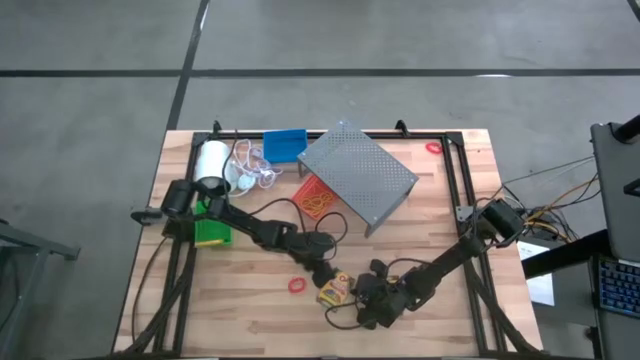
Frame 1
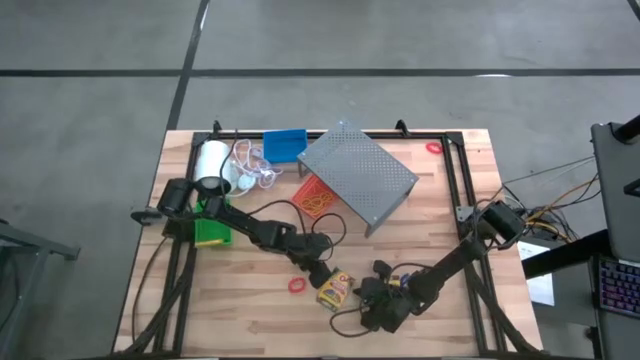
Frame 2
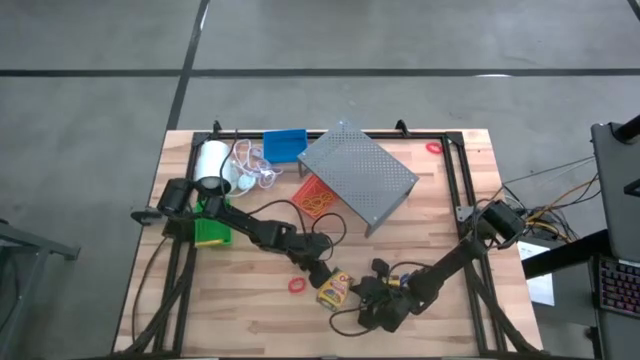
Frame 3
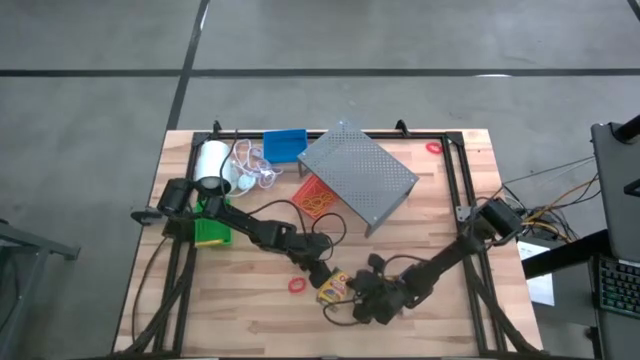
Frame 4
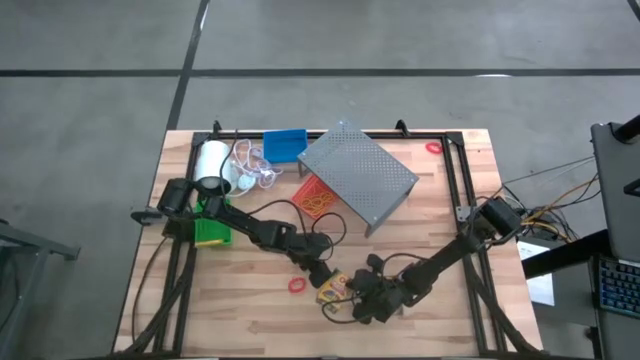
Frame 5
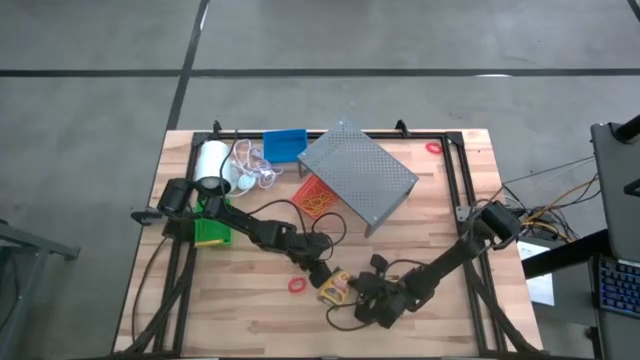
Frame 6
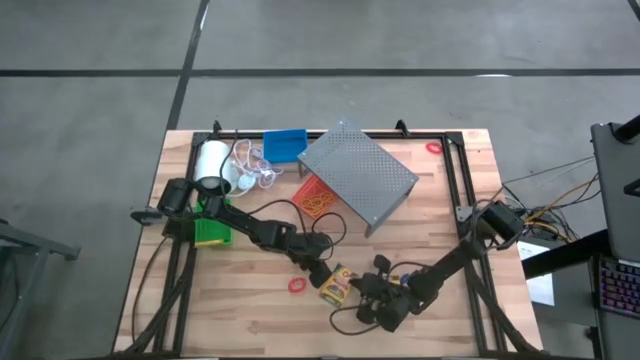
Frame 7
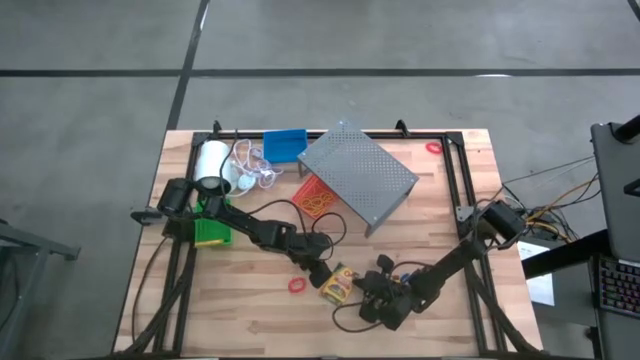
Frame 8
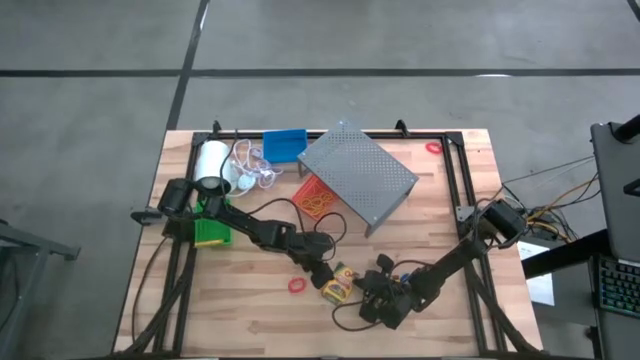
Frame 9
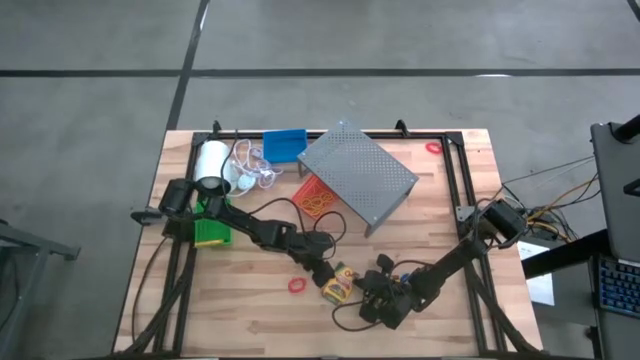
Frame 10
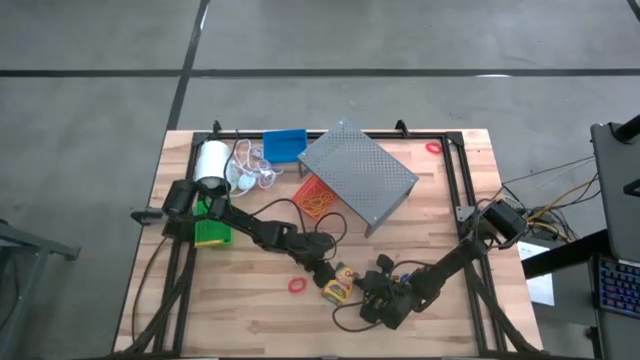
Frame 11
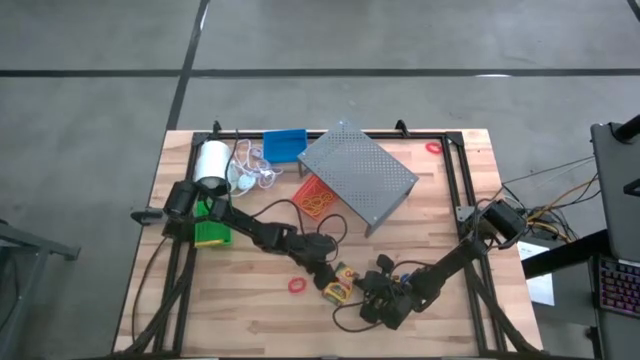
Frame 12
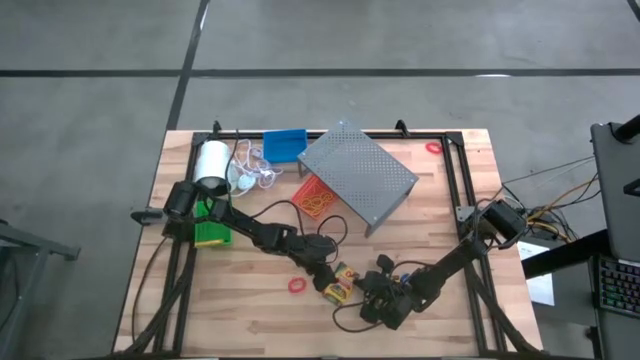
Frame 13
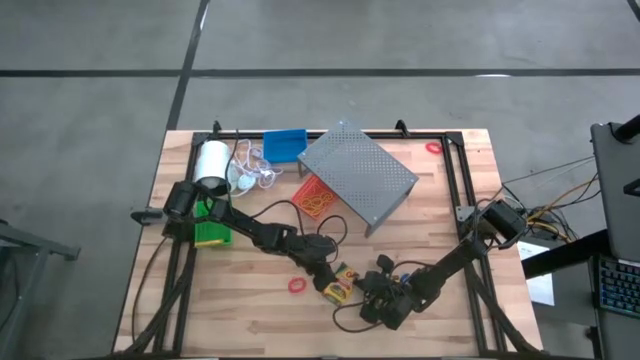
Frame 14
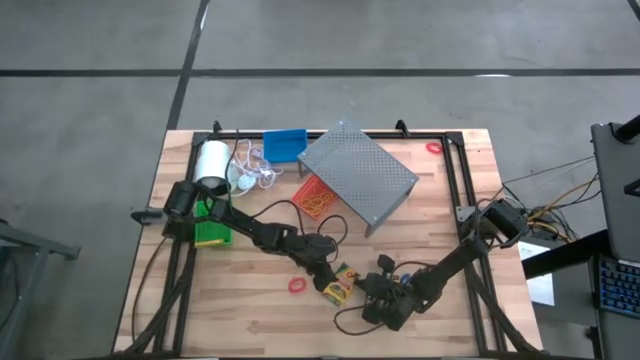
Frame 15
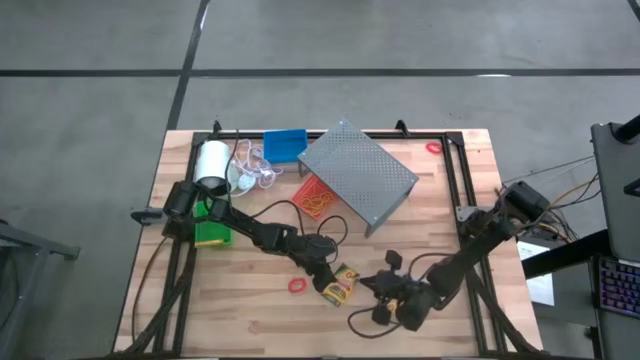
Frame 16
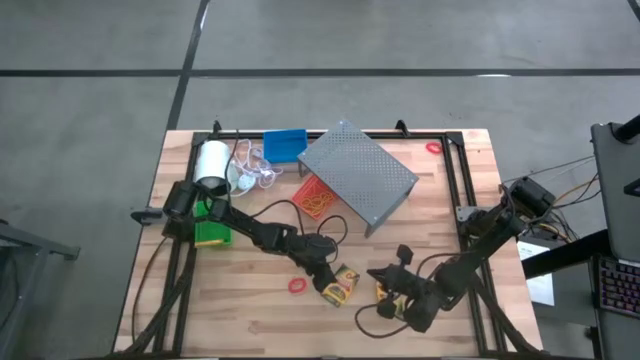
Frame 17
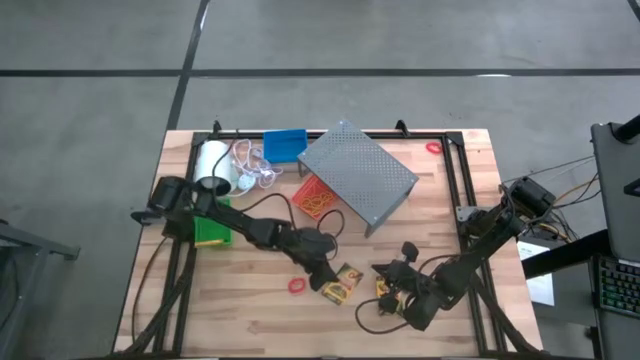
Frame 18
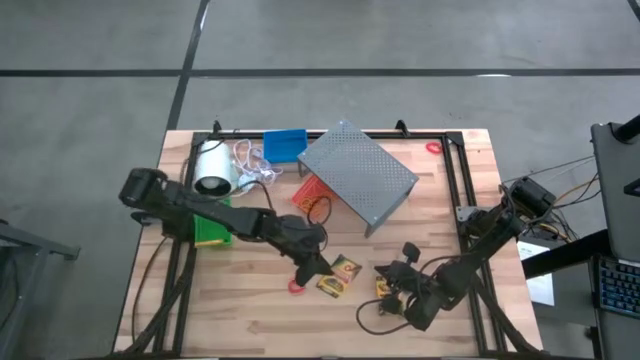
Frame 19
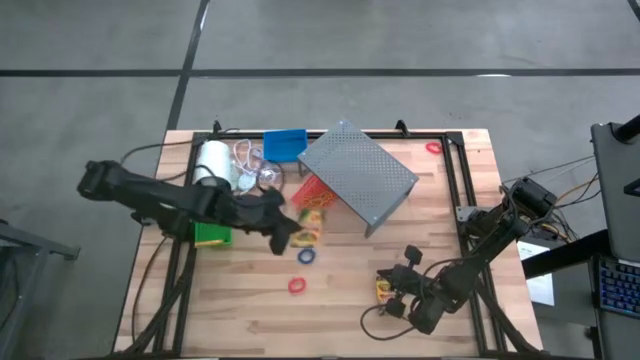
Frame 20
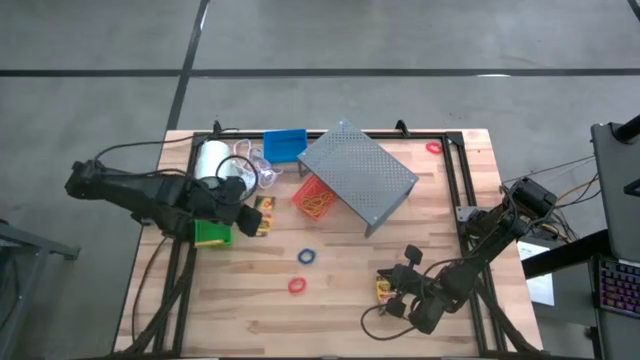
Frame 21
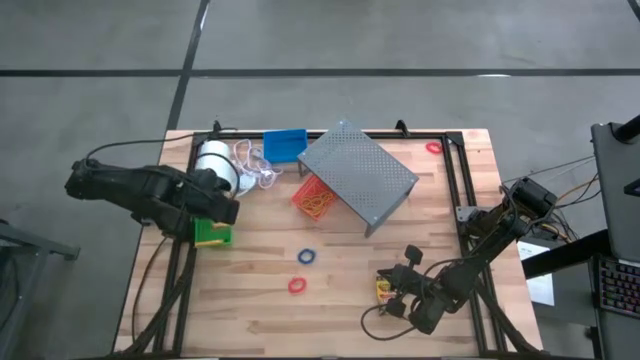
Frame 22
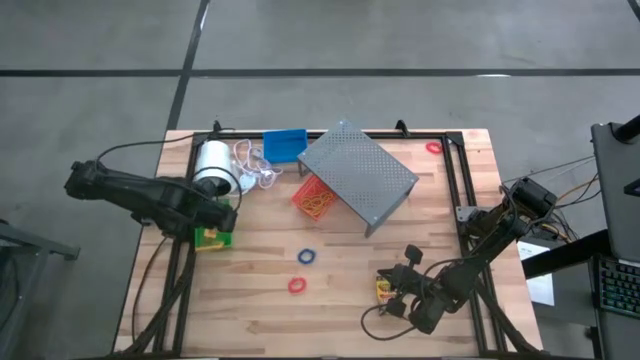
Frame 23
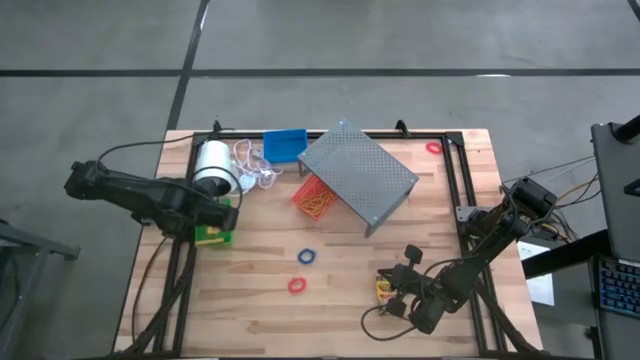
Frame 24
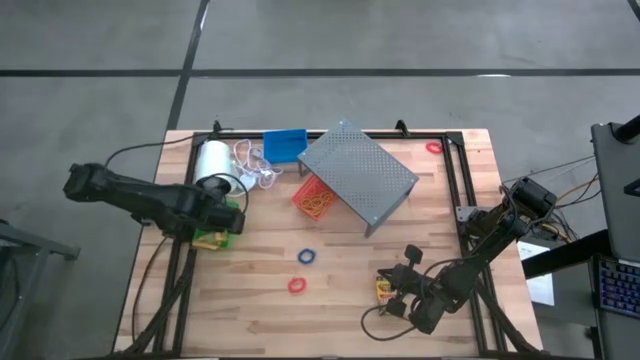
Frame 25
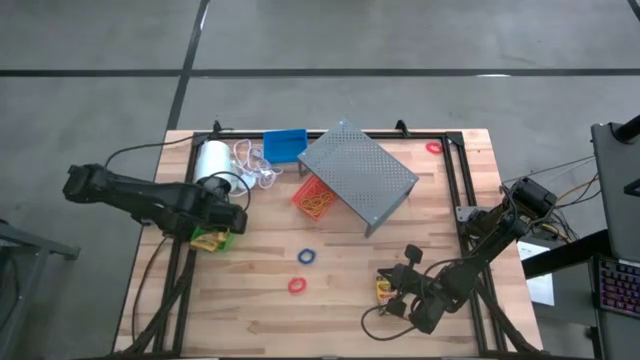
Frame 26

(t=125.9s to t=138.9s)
Task: Pick & Place Office Desk Supplies
Put the crayon box into the green bin

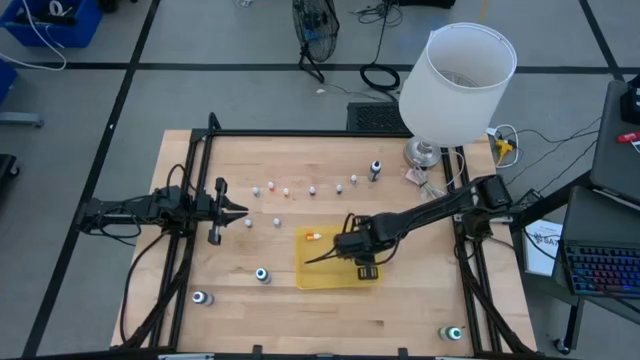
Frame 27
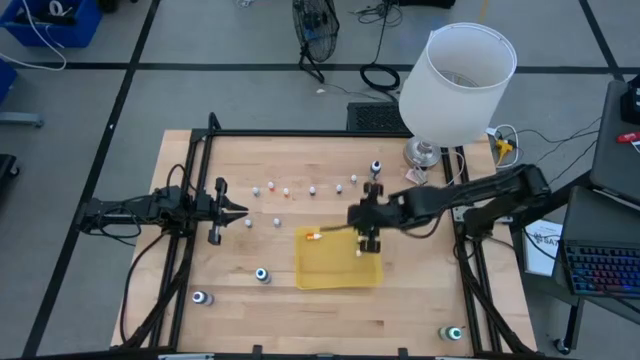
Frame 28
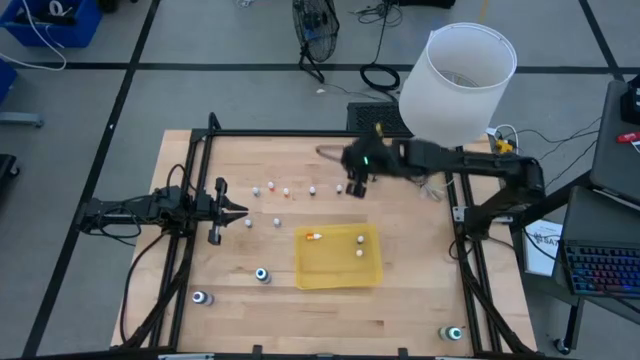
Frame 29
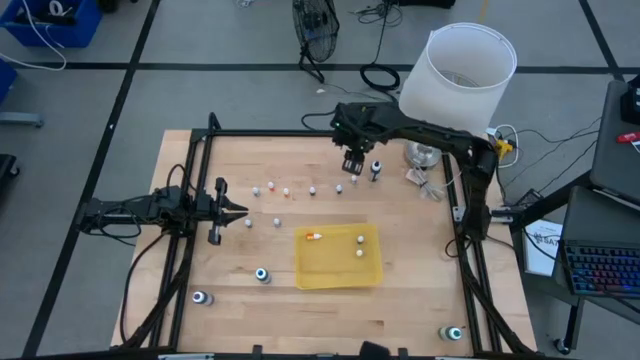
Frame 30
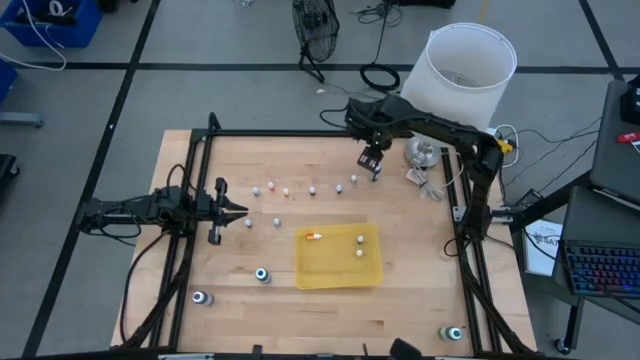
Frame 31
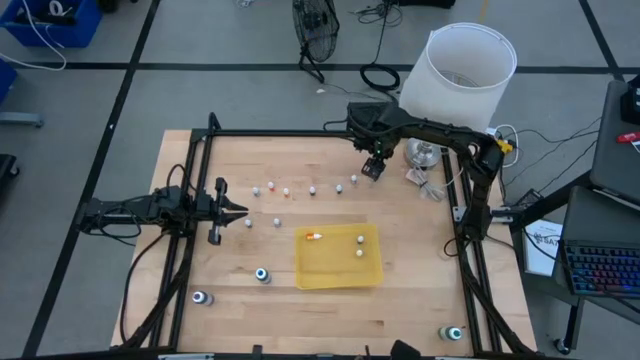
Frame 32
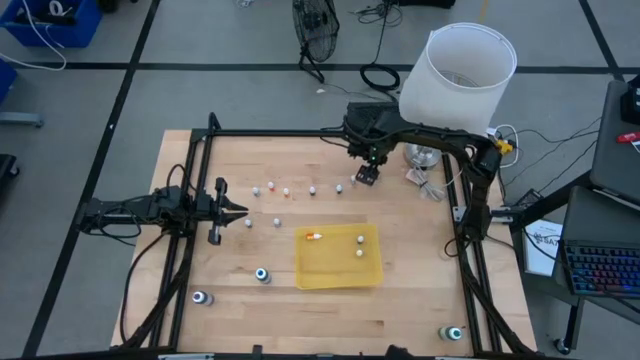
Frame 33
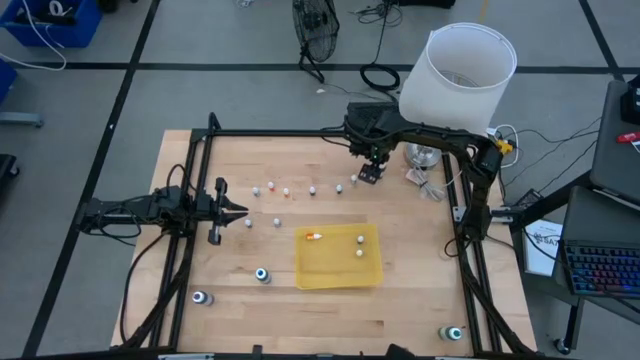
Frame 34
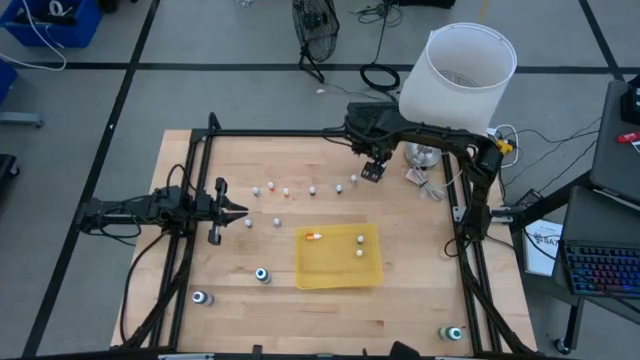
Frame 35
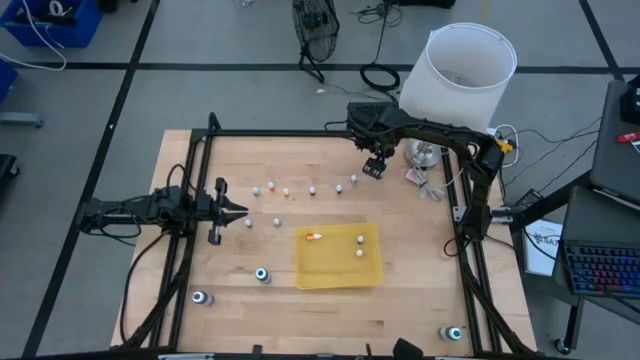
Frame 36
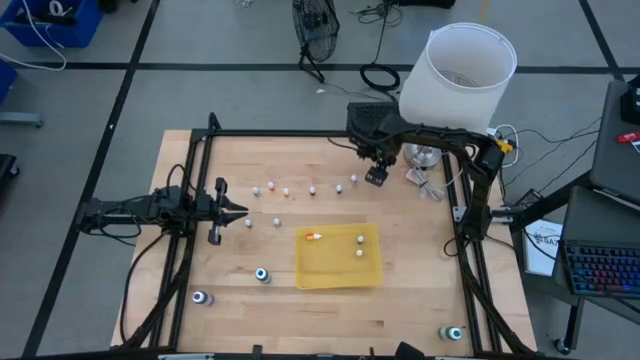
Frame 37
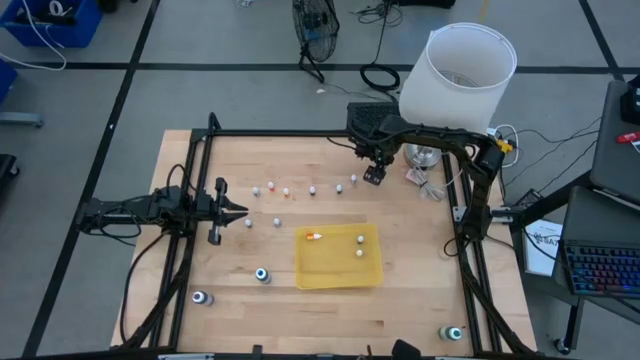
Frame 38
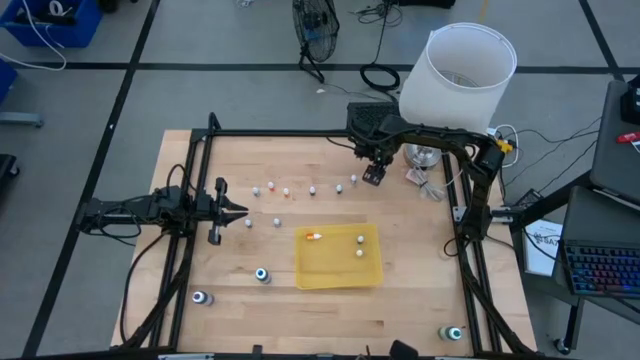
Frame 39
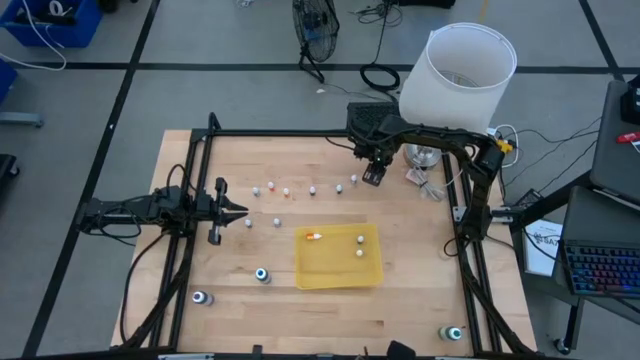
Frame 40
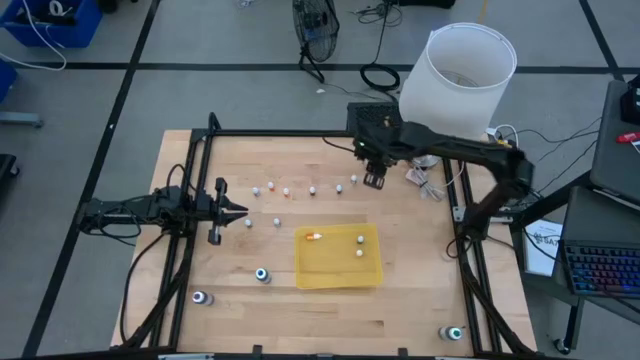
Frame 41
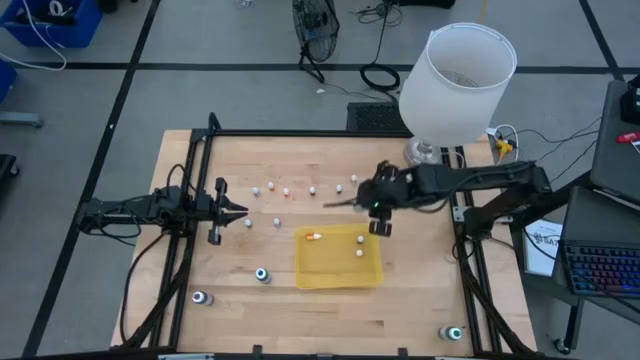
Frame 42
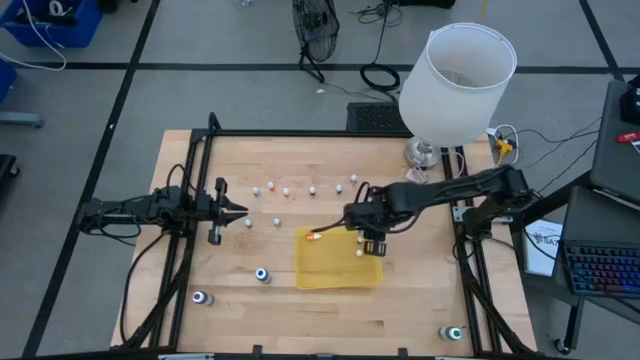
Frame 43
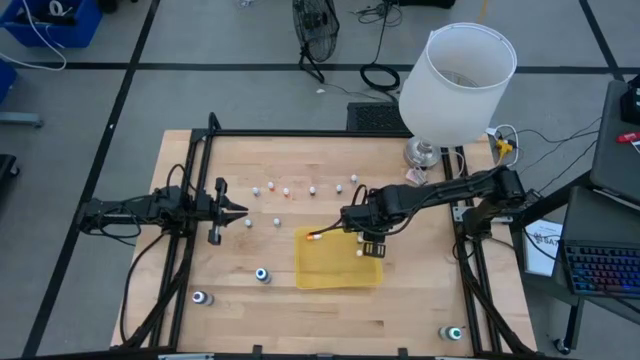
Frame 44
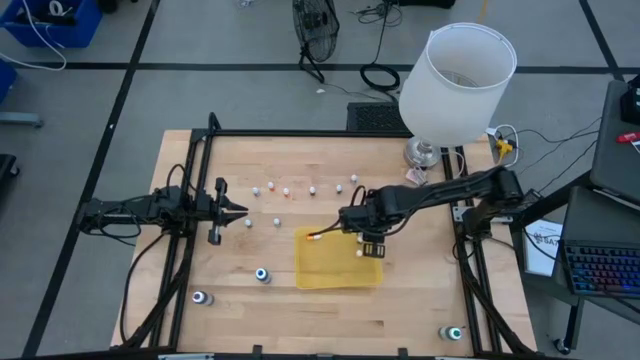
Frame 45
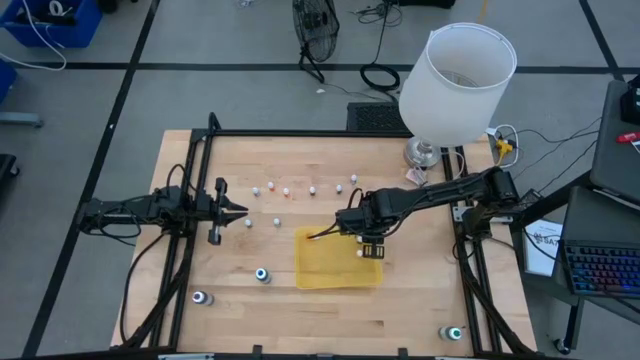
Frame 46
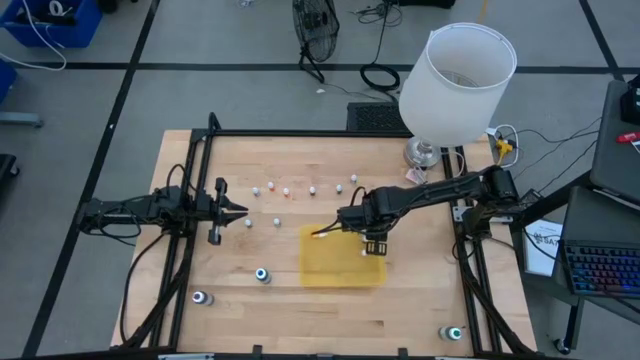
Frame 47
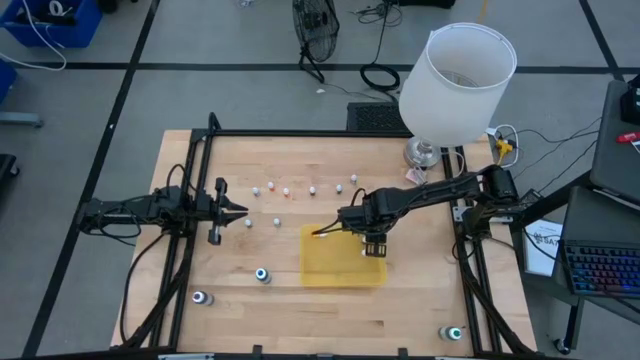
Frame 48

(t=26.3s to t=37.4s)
Task: Pick & Place food coloring
Put the large black food coloring bottle into the yellow bin
